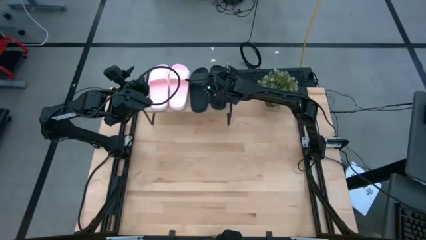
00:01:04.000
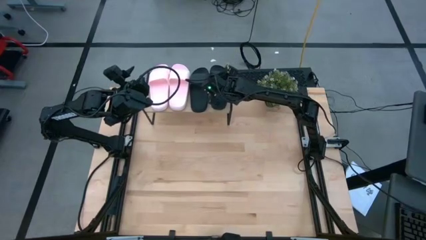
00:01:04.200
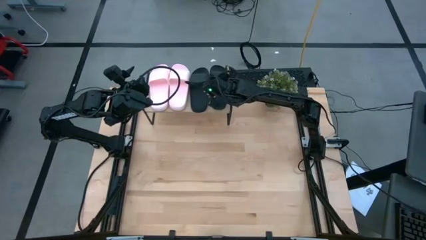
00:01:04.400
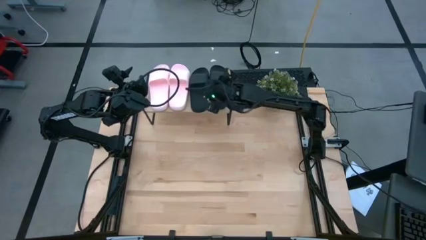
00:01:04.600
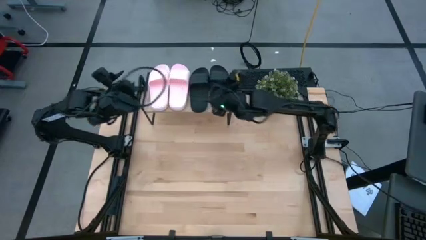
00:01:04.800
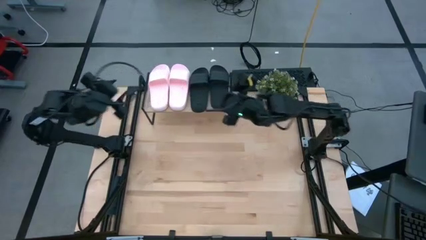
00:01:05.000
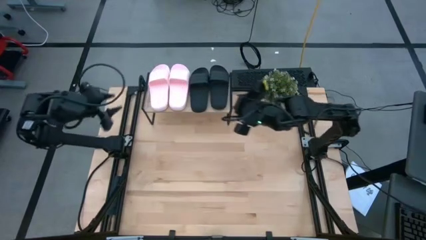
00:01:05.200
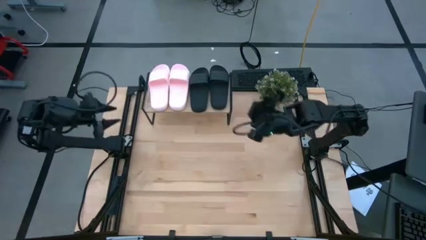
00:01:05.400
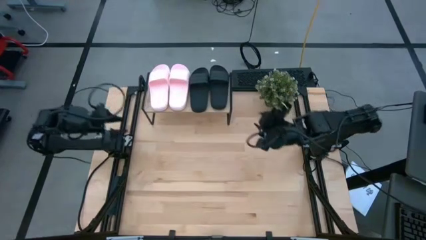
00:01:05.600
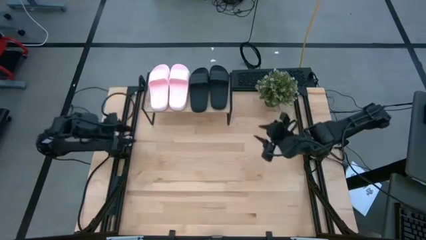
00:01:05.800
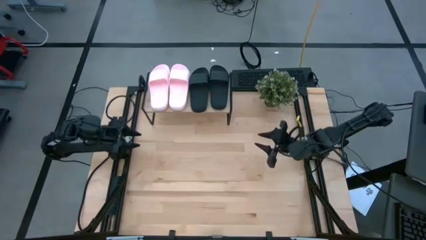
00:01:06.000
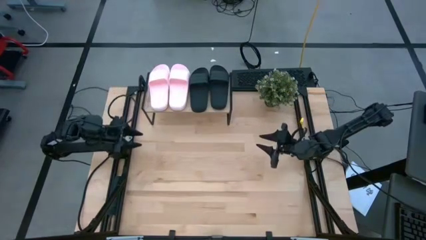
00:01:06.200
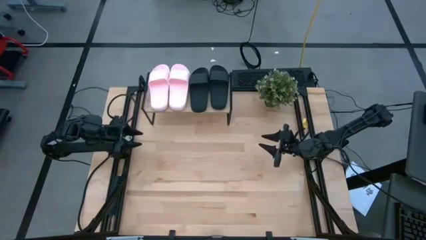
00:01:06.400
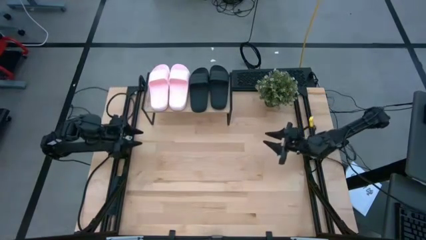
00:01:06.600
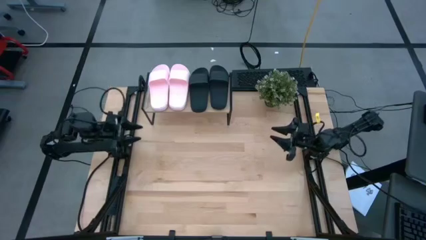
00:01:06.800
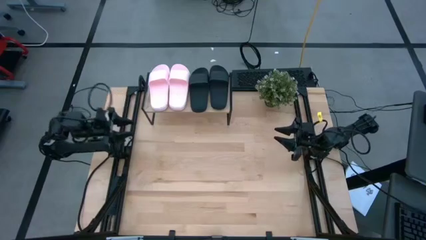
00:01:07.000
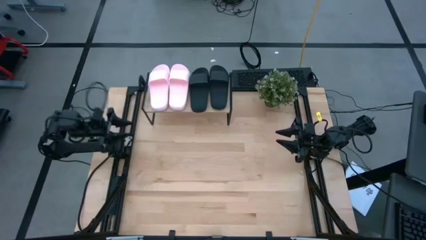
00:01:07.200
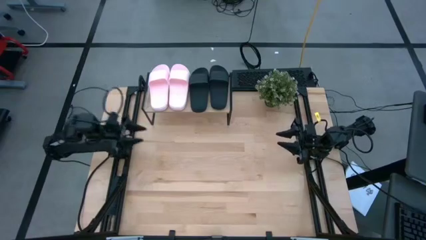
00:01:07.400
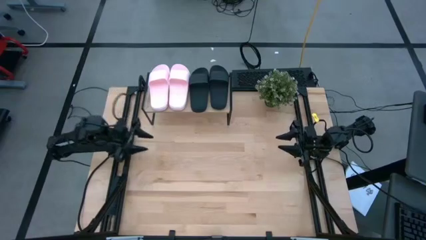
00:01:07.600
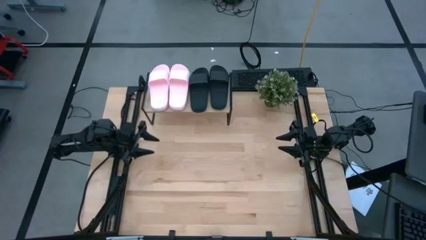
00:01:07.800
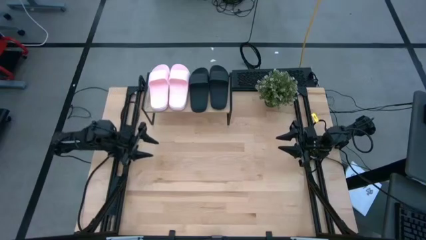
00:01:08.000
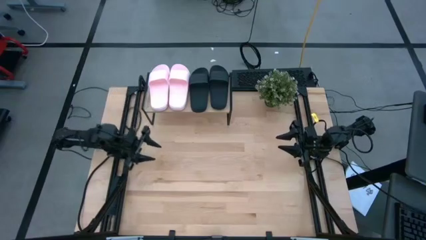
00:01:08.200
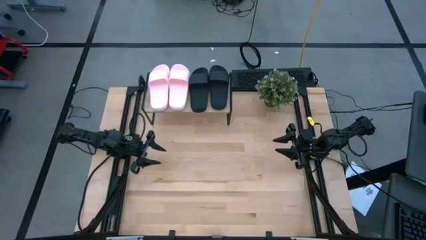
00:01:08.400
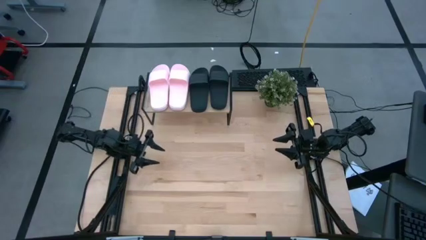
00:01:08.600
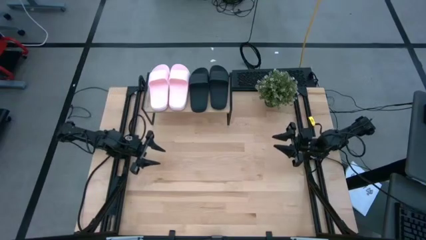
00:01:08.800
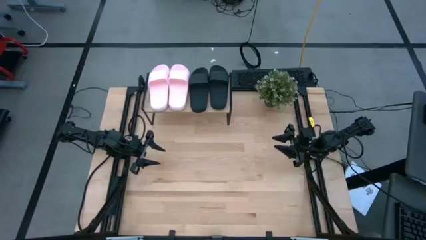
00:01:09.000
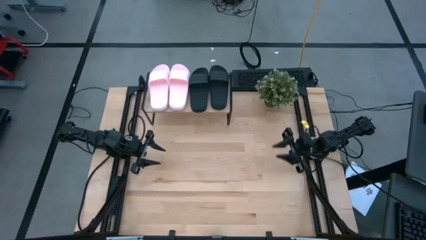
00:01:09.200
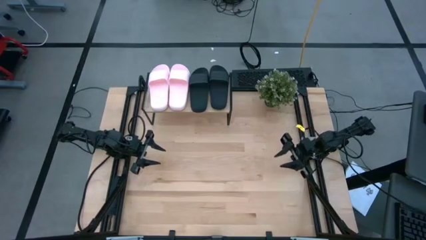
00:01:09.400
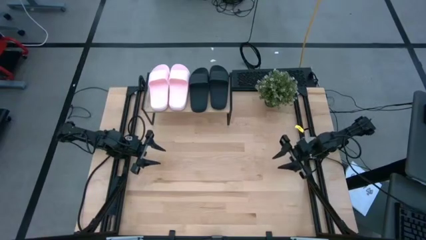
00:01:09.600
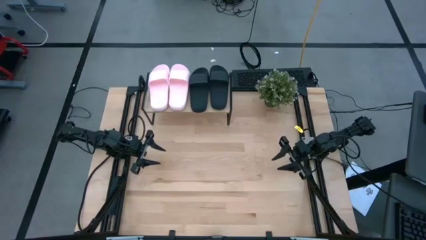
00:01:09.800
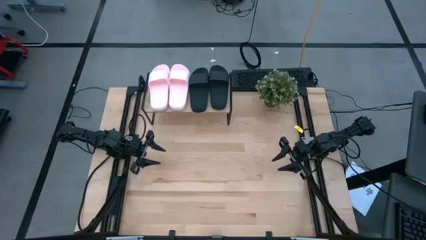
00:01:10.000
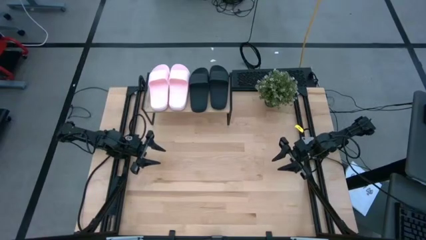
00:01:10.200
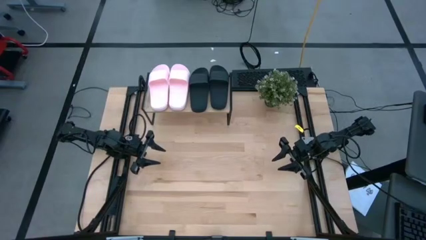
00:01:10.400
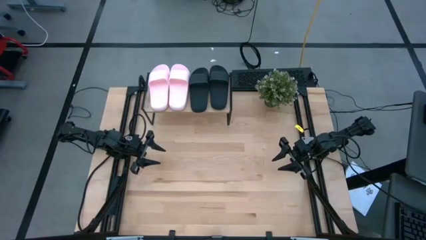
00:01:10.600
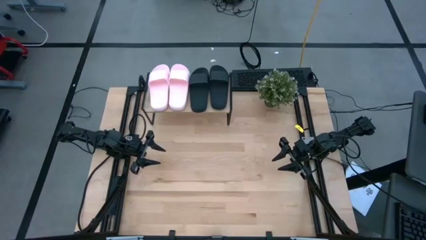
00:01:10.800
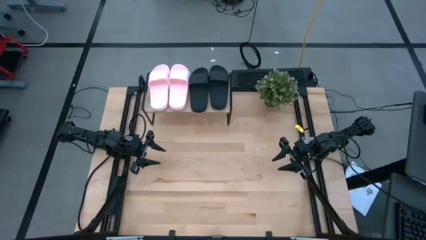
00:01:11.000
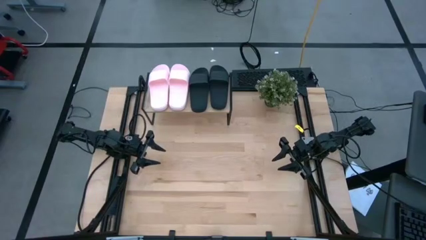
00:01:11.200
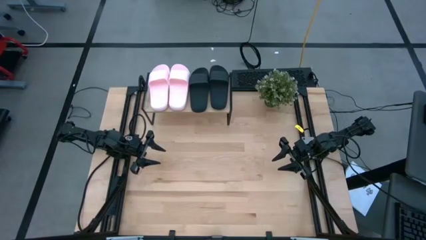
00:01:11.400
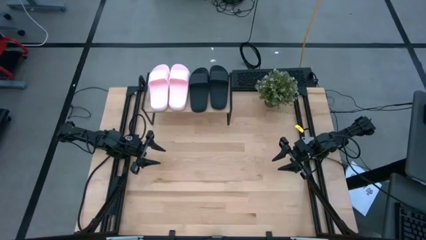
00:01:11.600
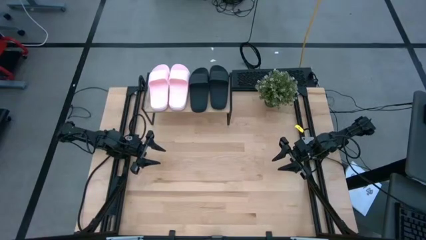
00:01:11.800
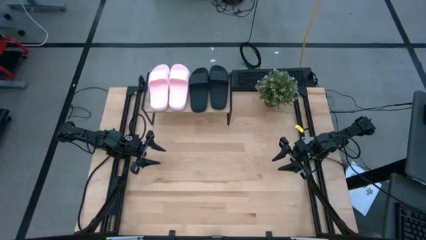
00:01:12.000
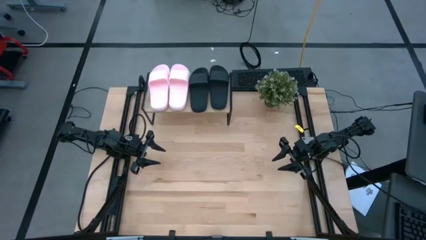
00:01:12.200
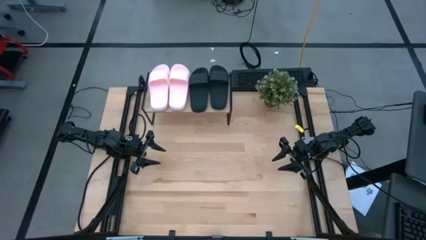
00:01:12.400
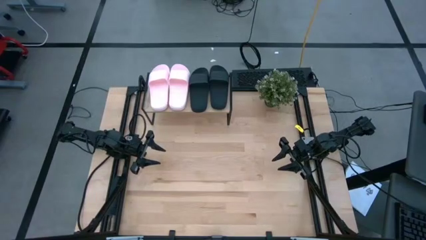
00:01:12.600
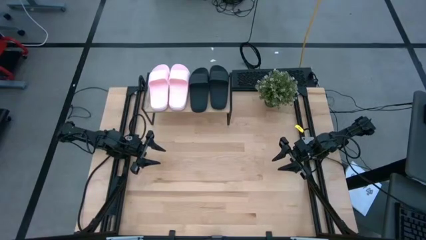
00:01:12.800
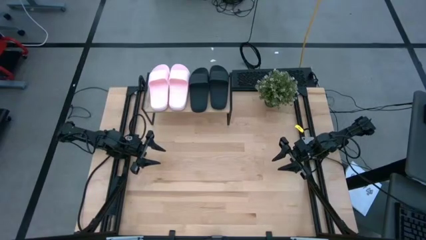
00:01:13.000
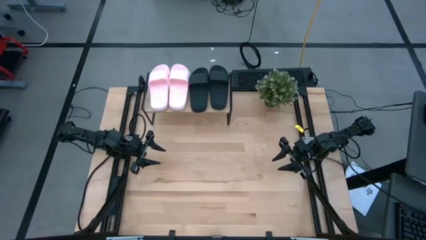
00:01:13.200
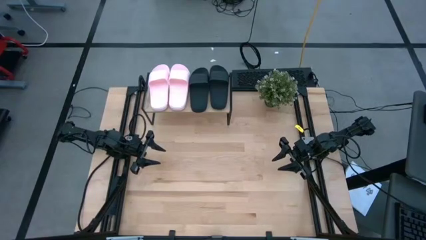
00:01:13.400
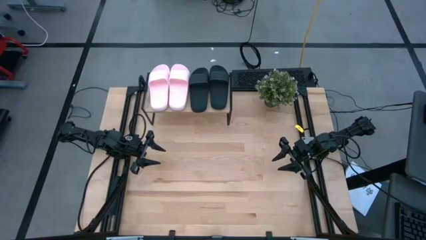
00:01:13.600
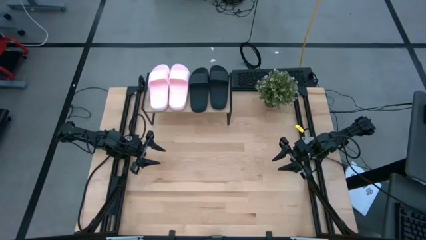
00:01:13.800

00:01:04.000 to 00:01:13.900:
Task: Pick and place slides into the shelf
Return to Home Position
